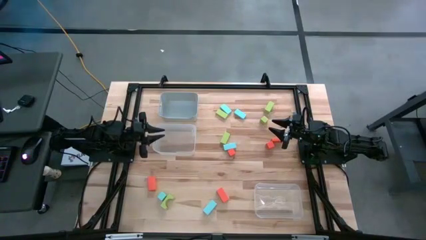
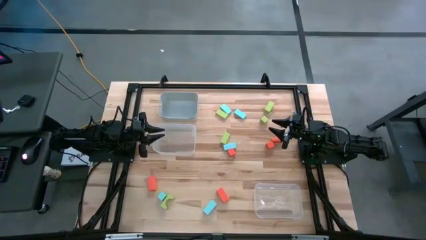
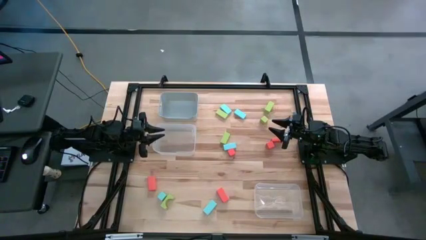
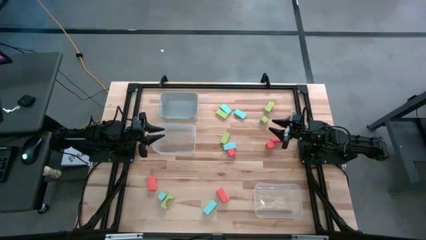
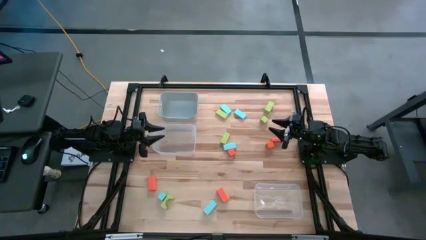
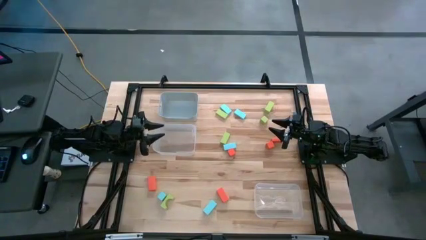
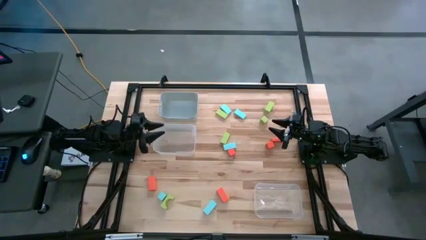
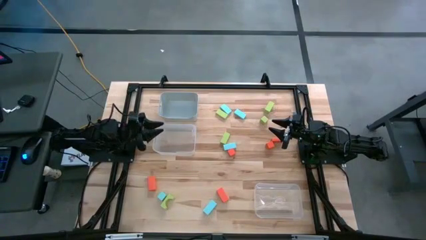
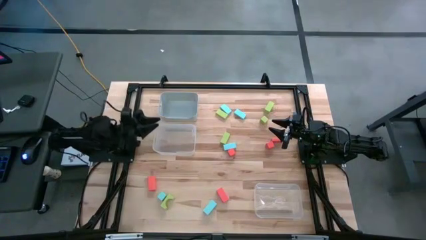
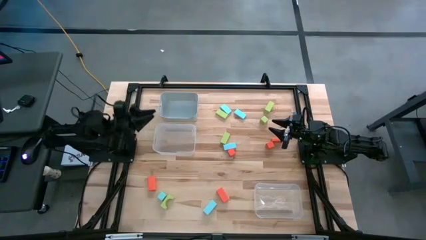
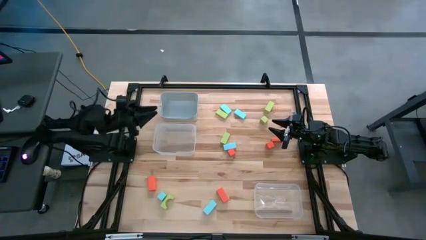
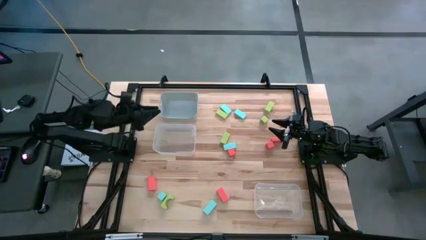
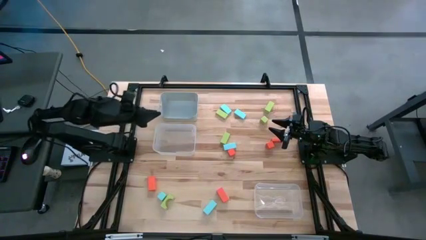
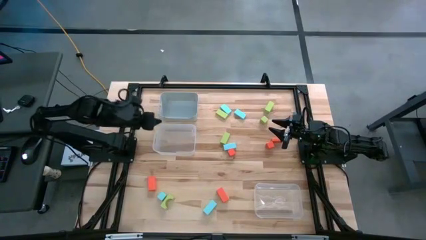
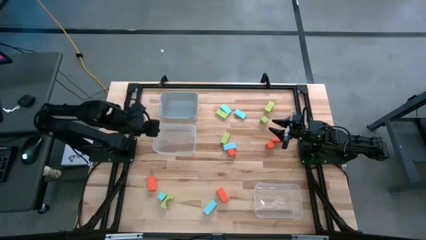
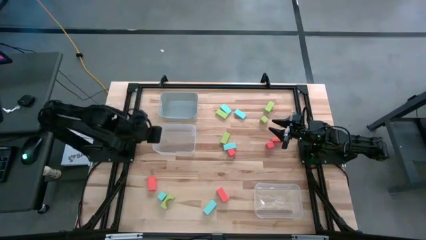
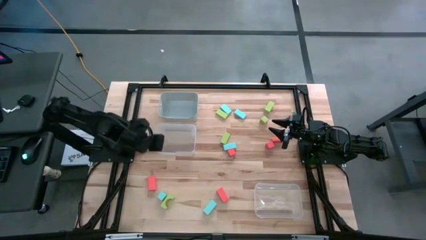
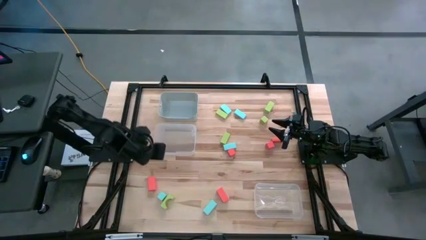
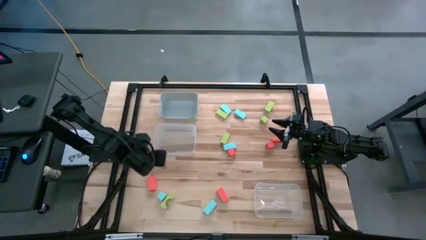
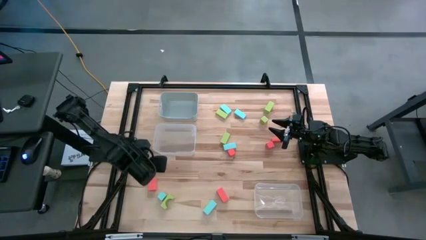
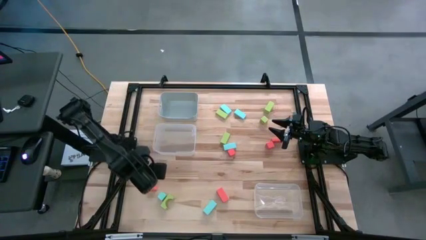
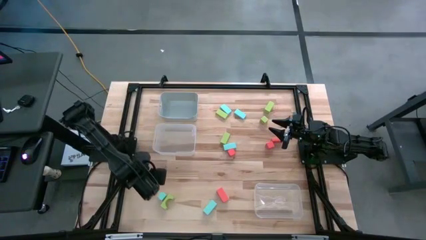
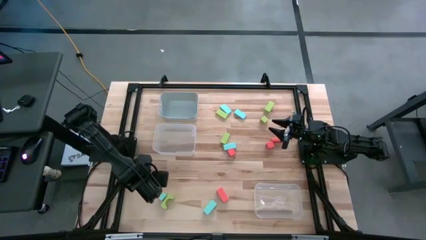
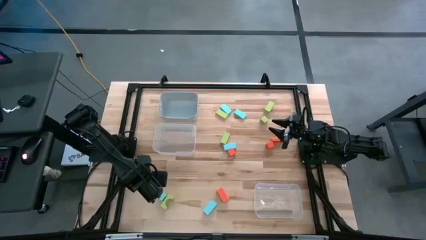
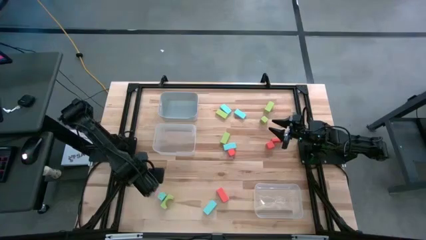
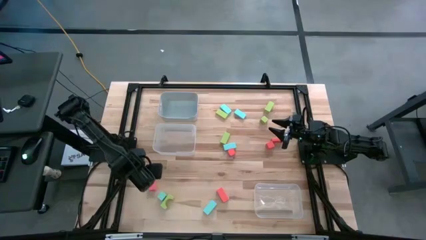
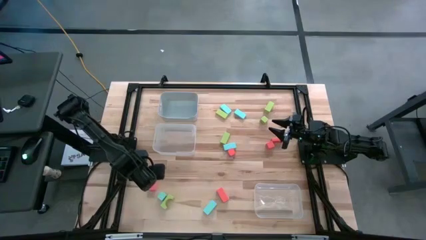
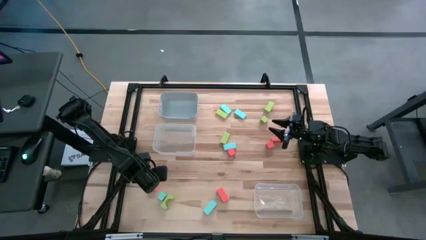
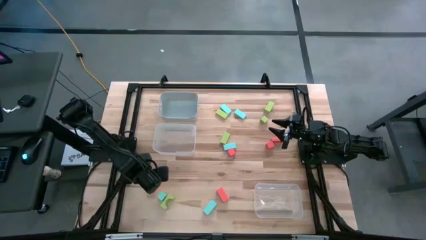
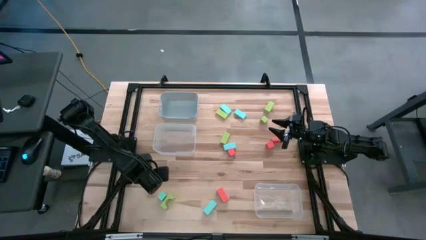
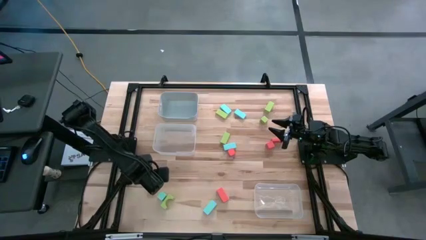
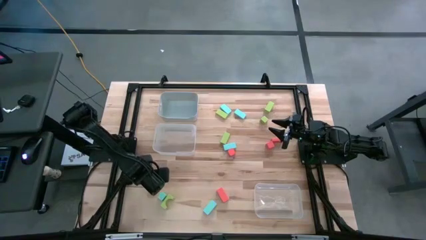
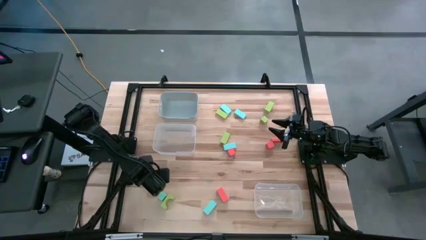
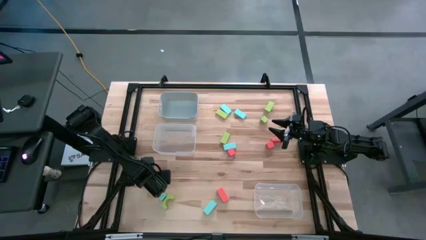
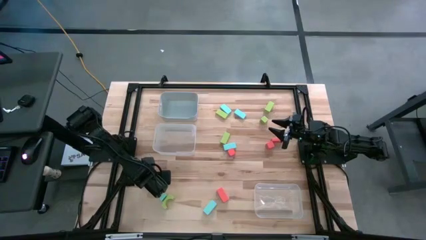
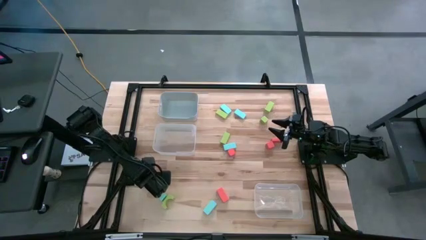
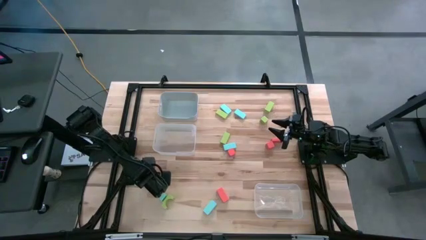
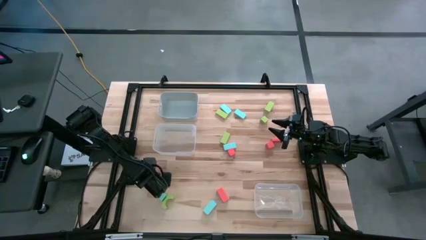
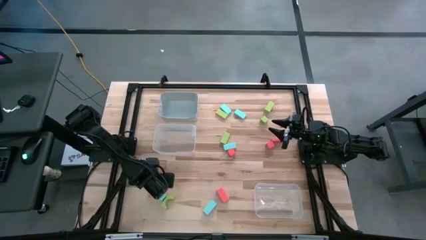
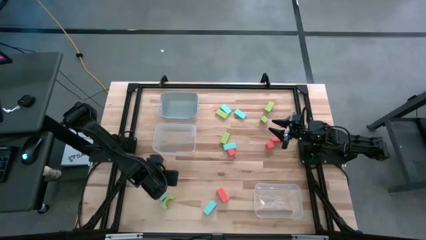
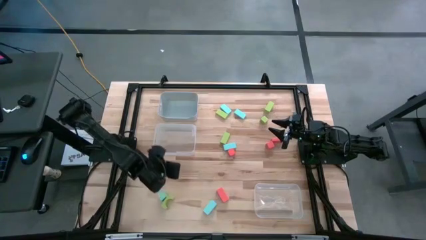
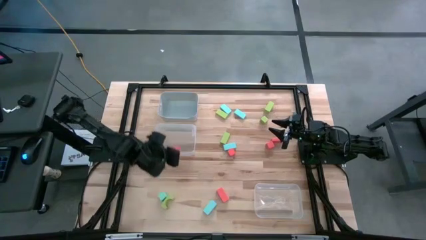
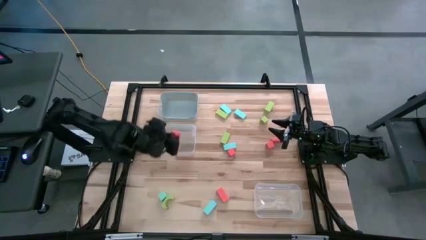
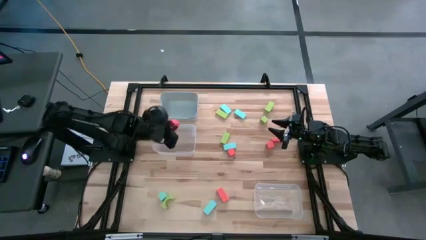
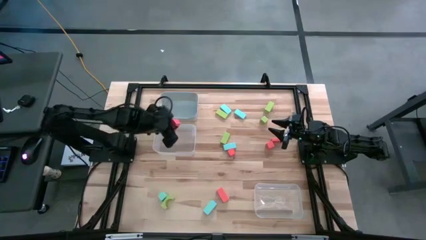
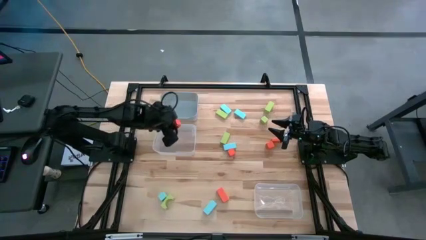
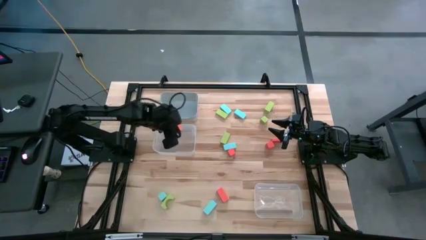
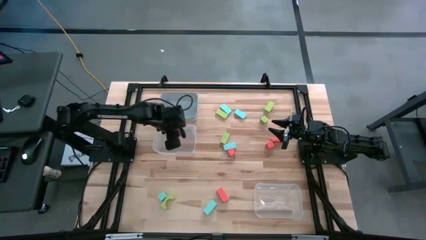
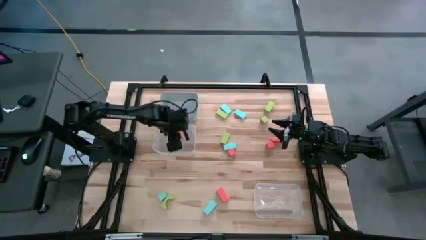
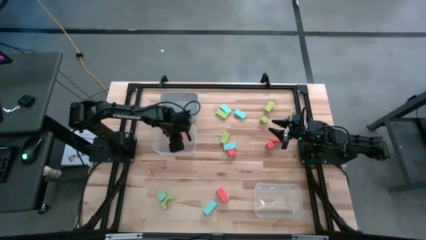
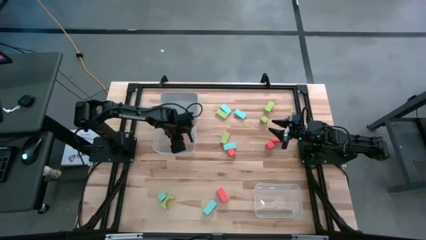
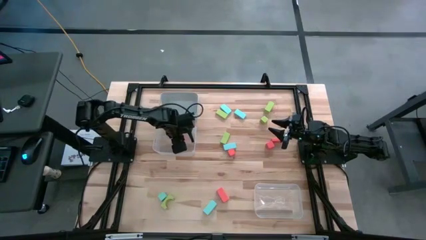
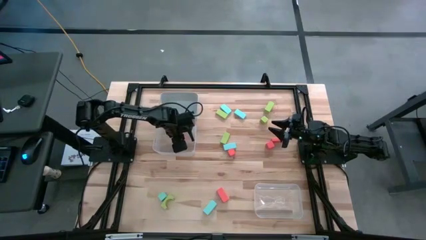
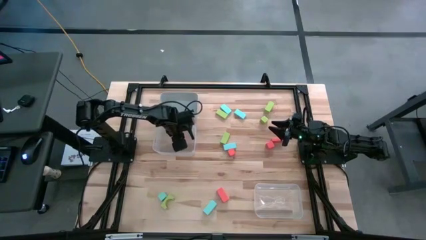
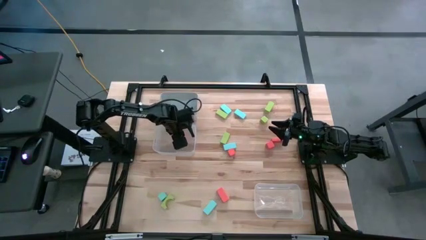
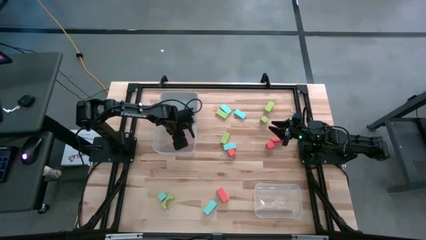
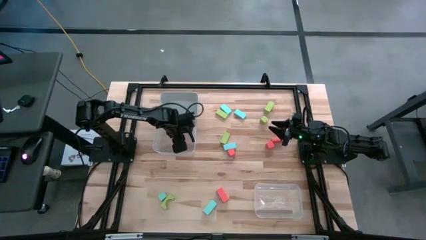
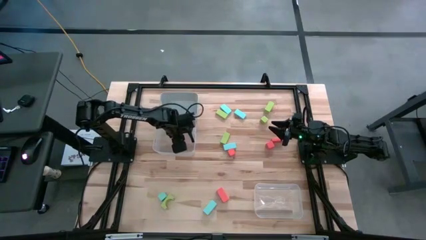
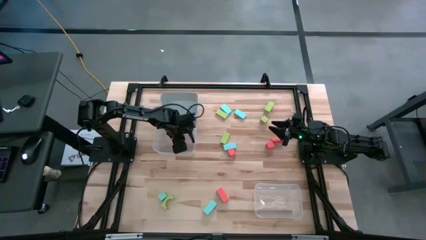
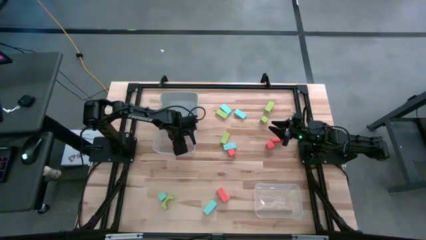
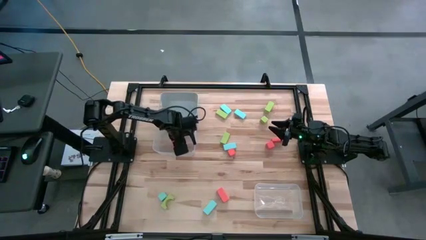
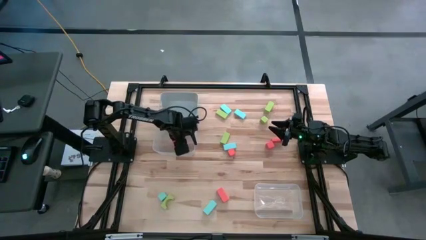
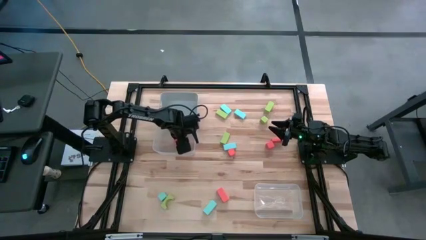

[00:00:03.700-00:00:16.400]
Task: Sort & place blocks by color
Put the orange block into the top transparent bin

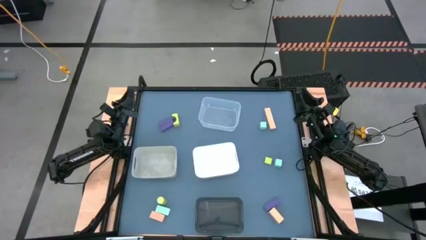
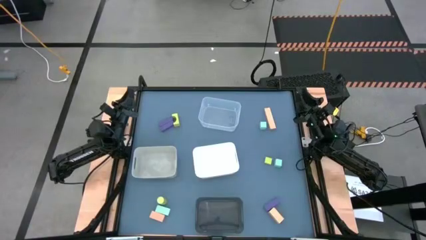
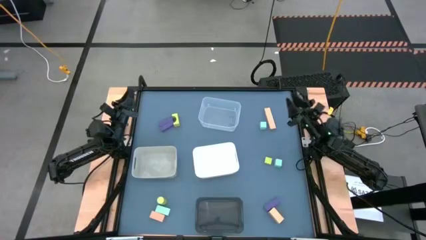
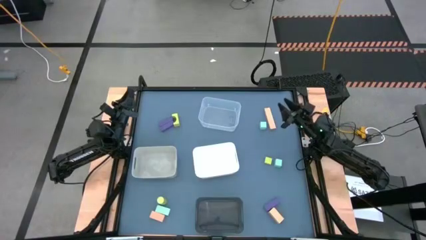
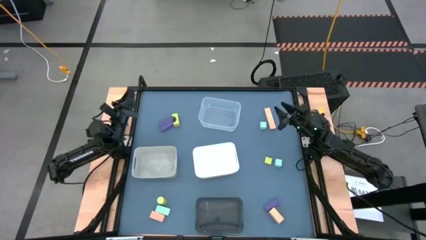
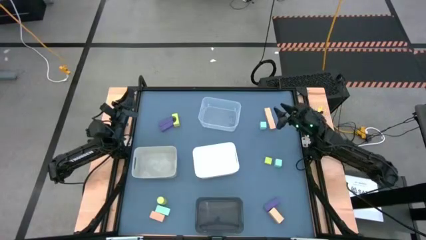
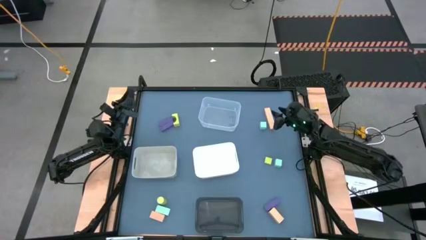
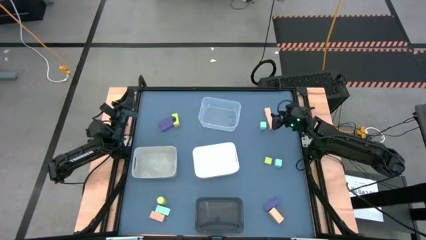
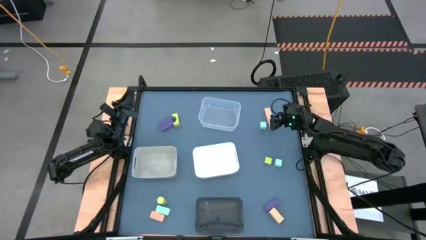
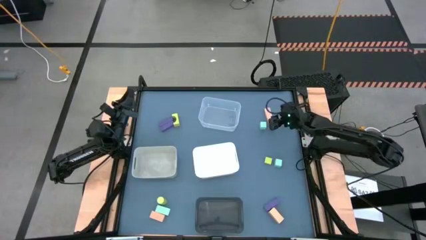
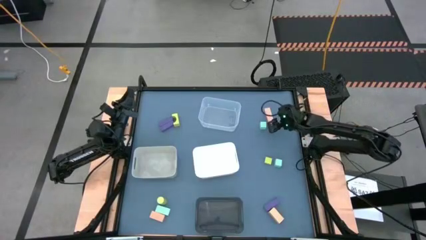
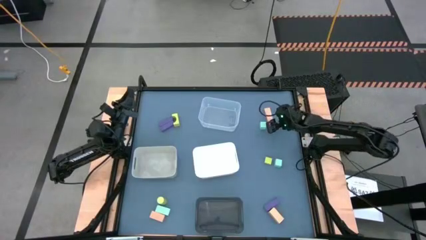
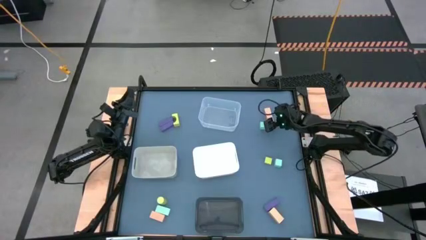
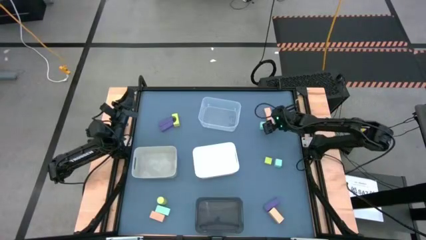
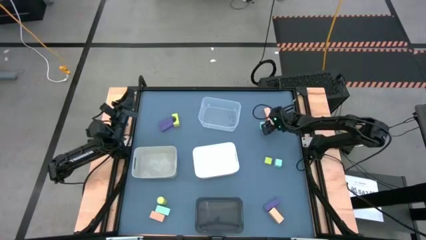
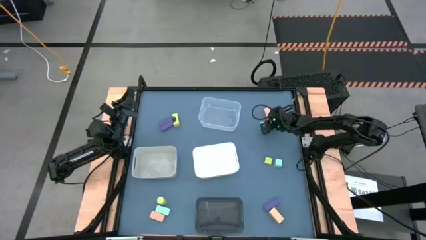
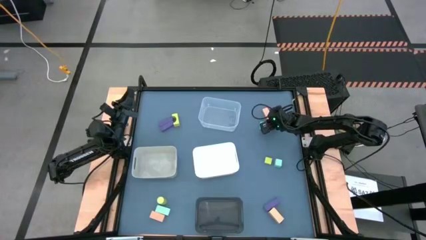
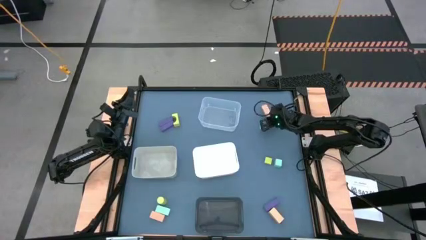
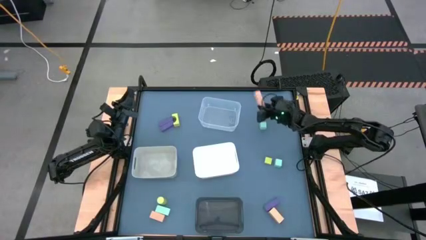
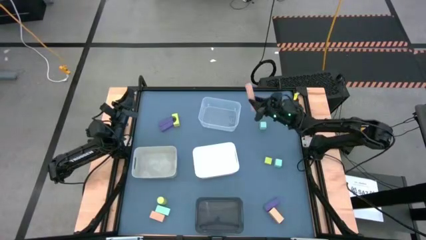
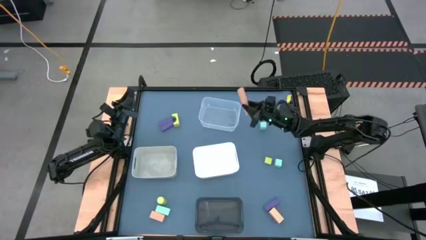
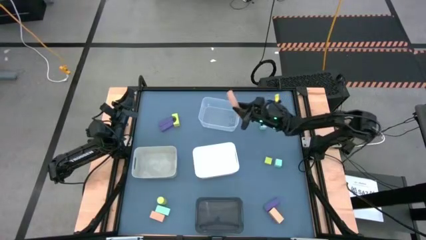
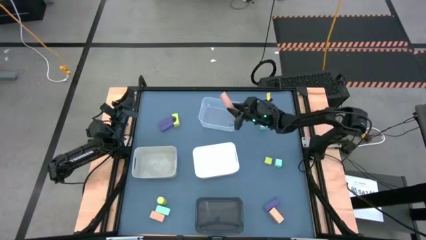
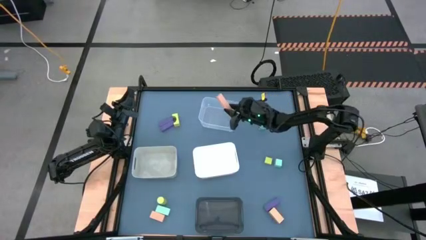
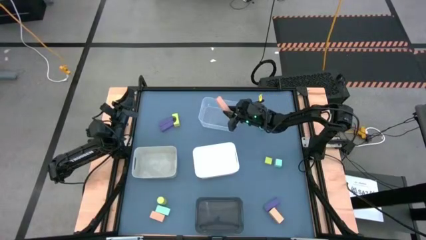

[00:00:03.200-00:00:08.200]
Task: Sort & place blocks by color
Put the top light brown block into the transparent bin
